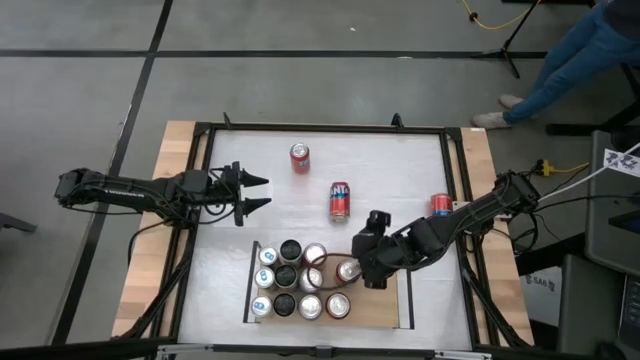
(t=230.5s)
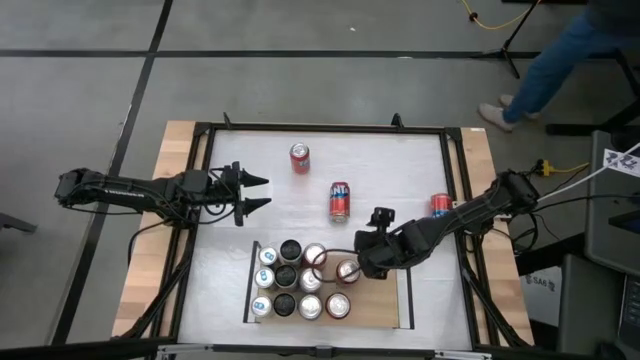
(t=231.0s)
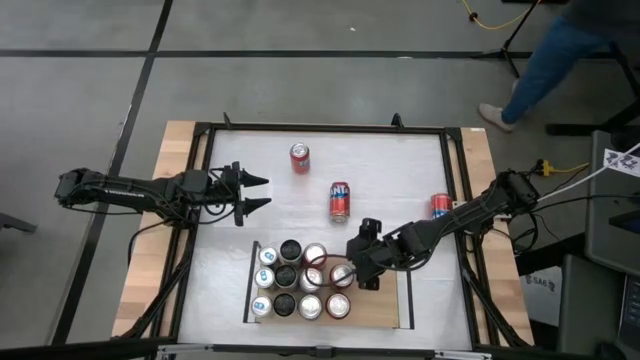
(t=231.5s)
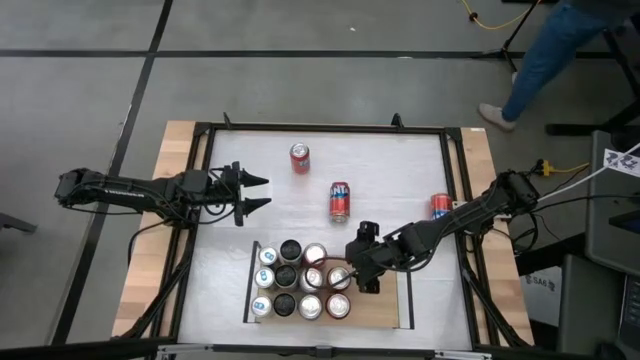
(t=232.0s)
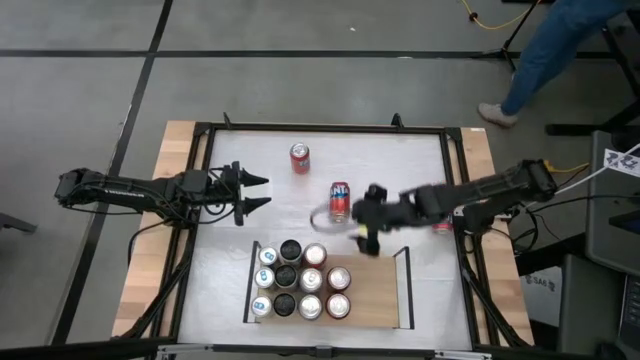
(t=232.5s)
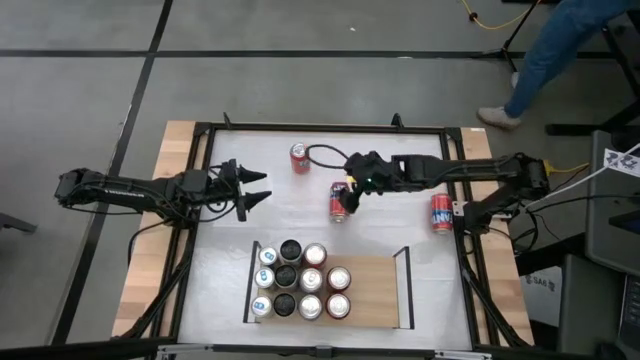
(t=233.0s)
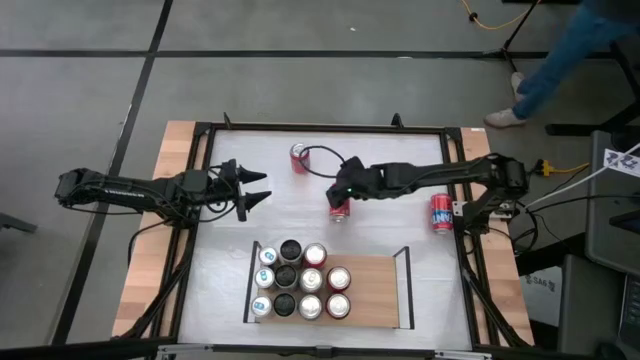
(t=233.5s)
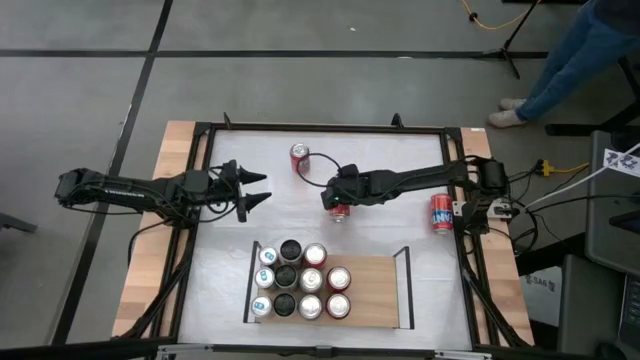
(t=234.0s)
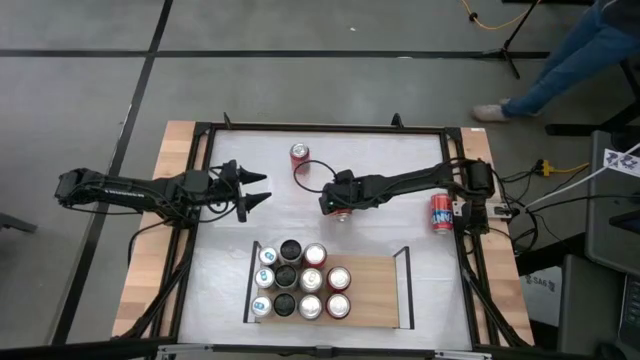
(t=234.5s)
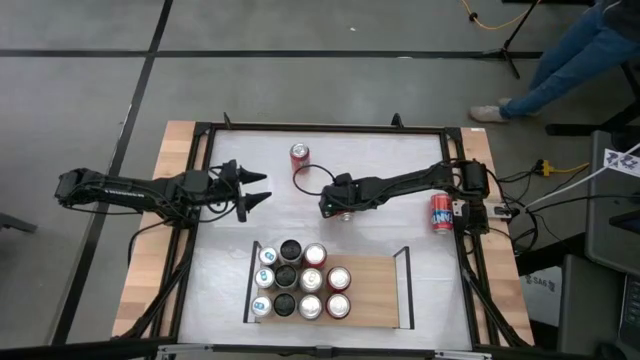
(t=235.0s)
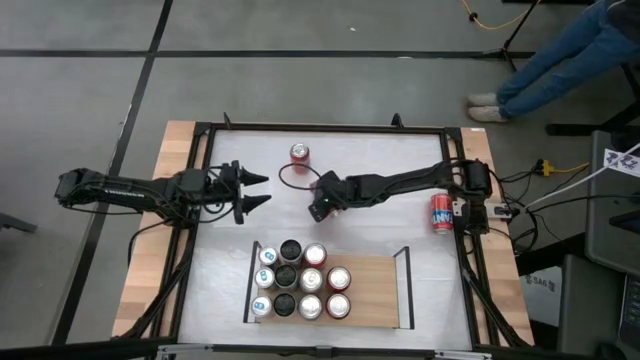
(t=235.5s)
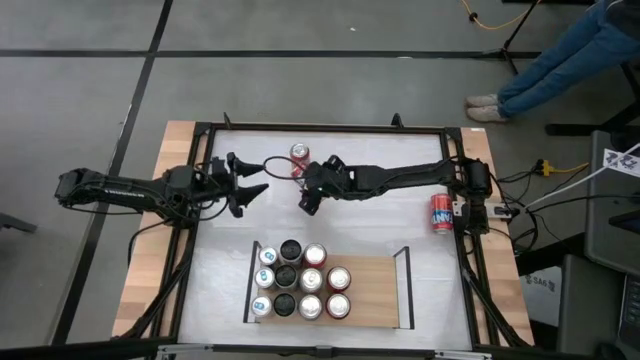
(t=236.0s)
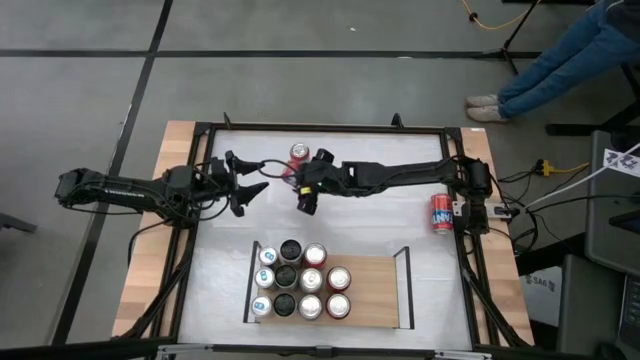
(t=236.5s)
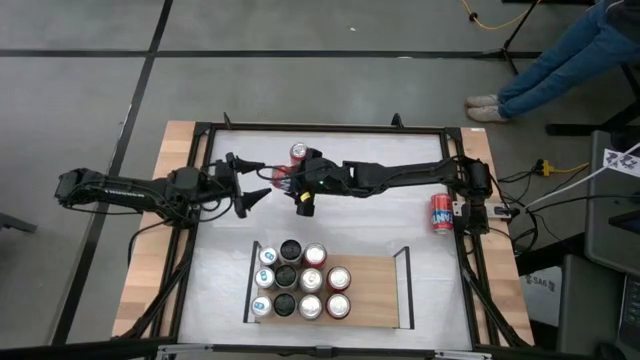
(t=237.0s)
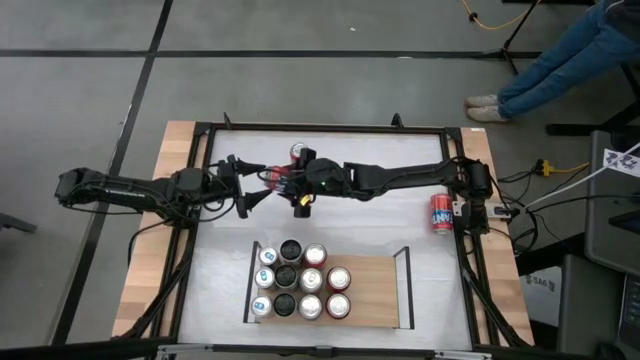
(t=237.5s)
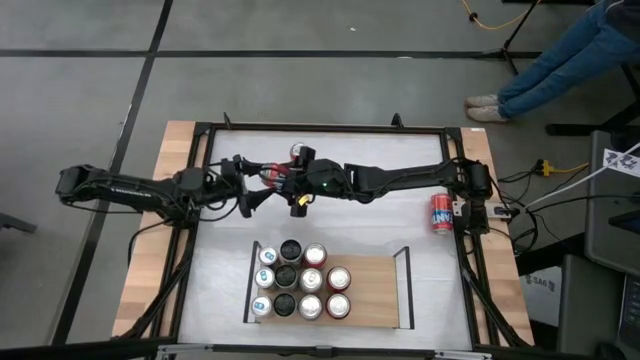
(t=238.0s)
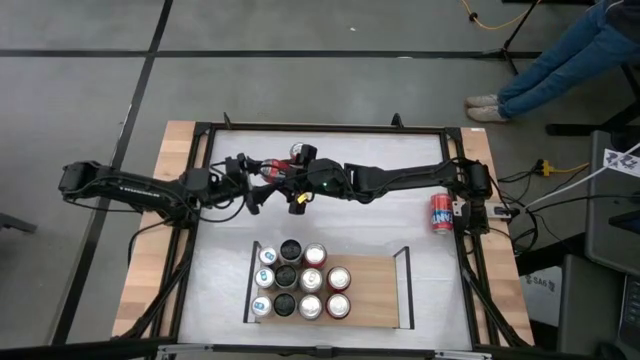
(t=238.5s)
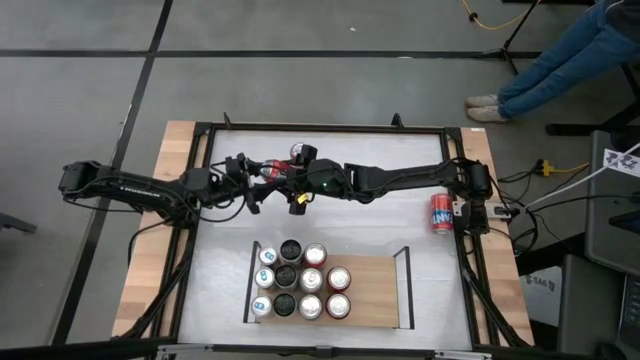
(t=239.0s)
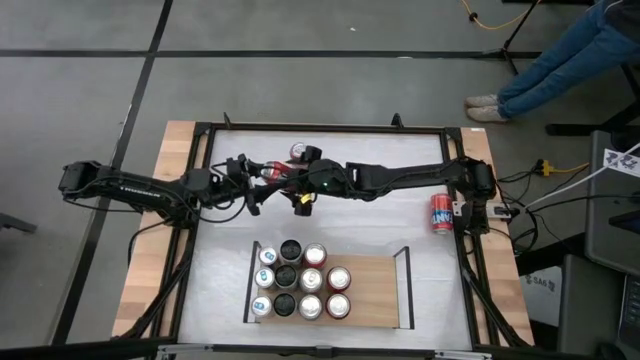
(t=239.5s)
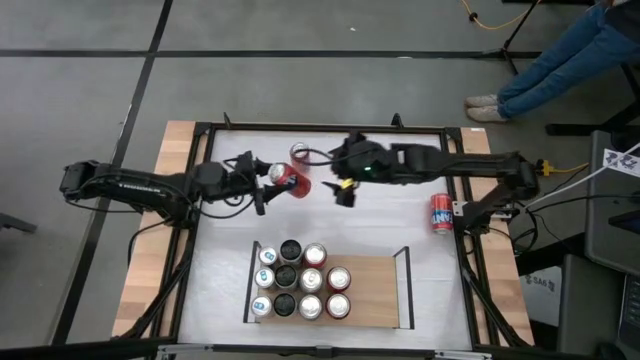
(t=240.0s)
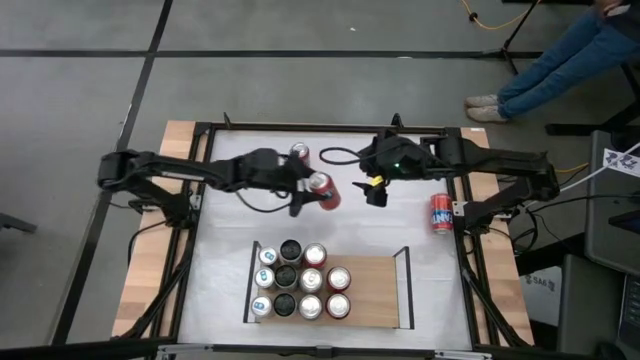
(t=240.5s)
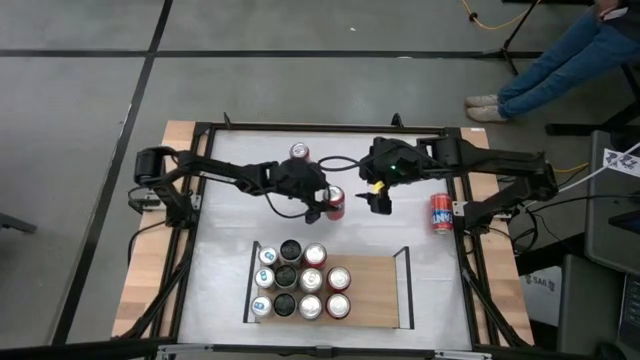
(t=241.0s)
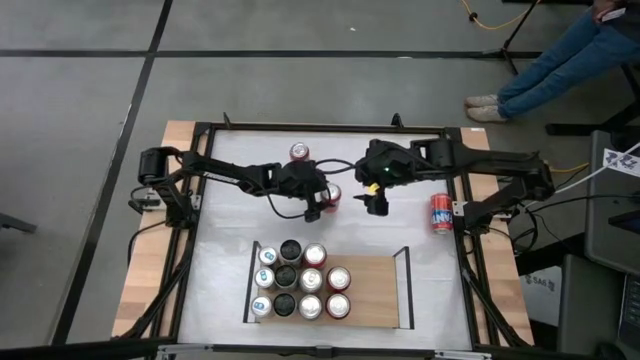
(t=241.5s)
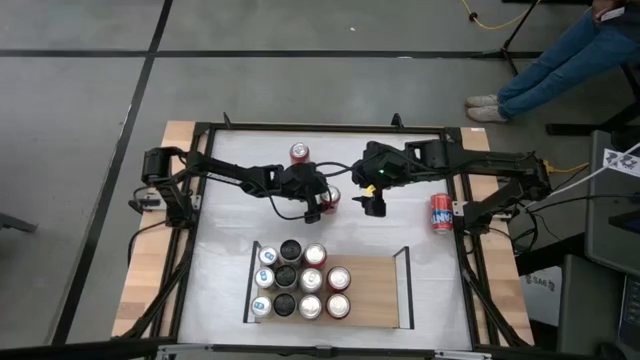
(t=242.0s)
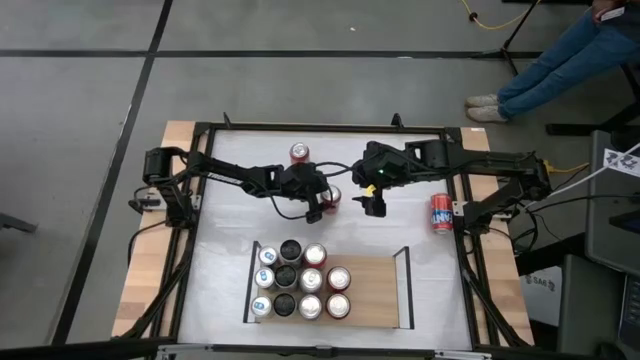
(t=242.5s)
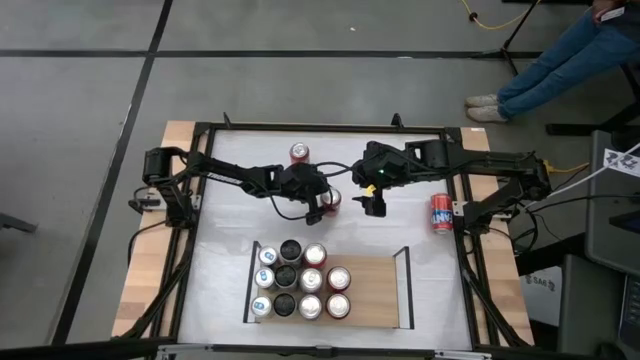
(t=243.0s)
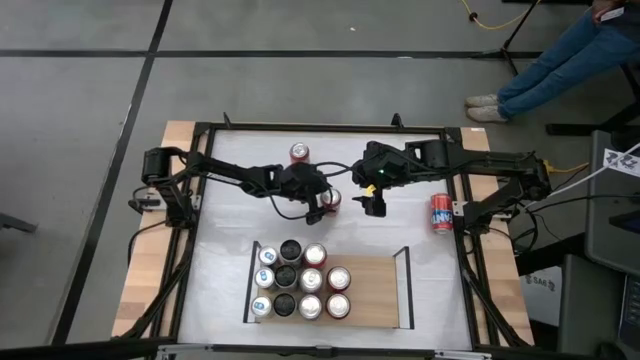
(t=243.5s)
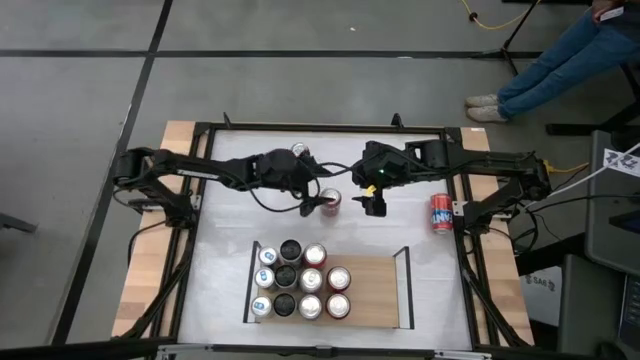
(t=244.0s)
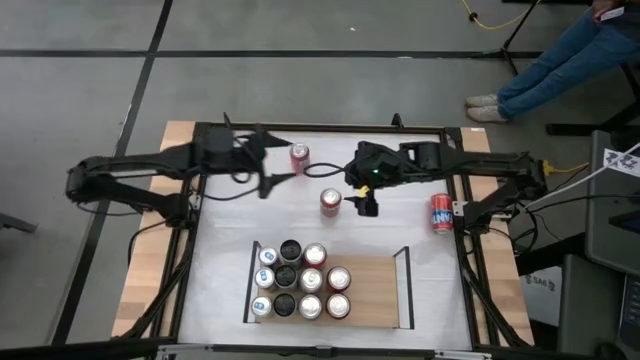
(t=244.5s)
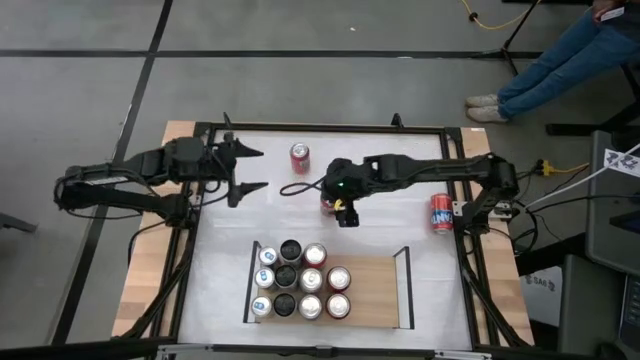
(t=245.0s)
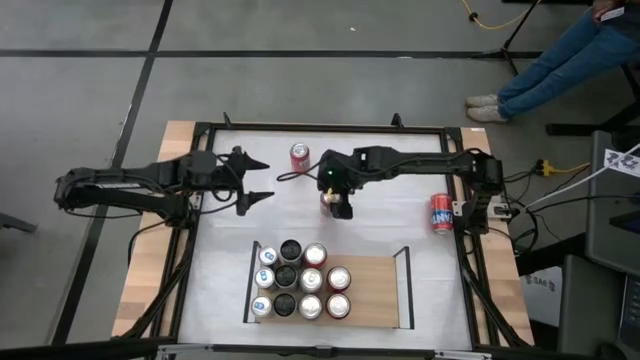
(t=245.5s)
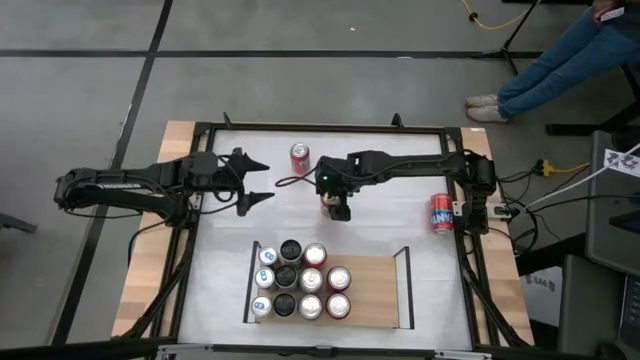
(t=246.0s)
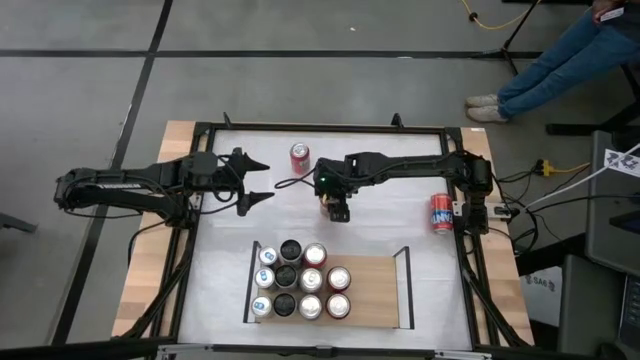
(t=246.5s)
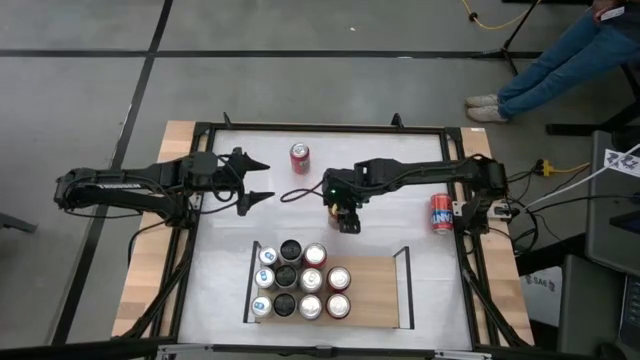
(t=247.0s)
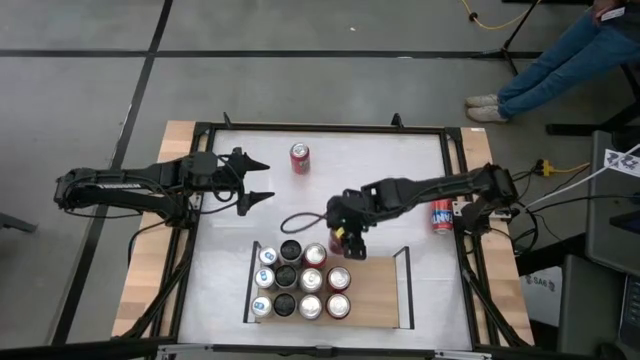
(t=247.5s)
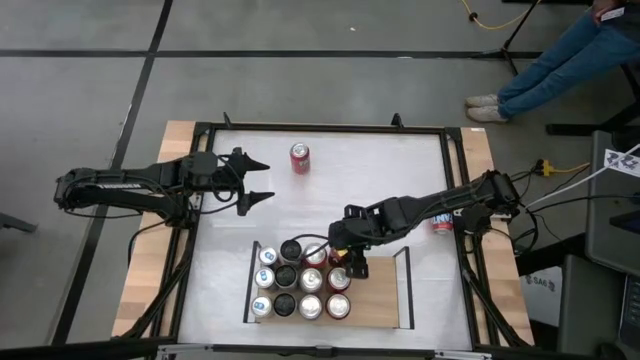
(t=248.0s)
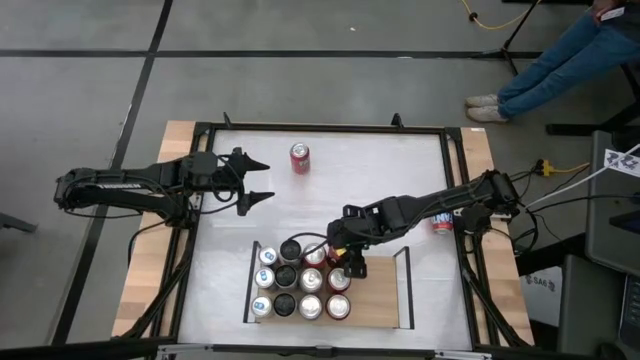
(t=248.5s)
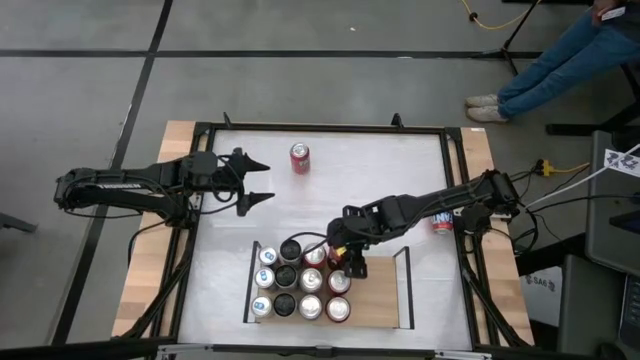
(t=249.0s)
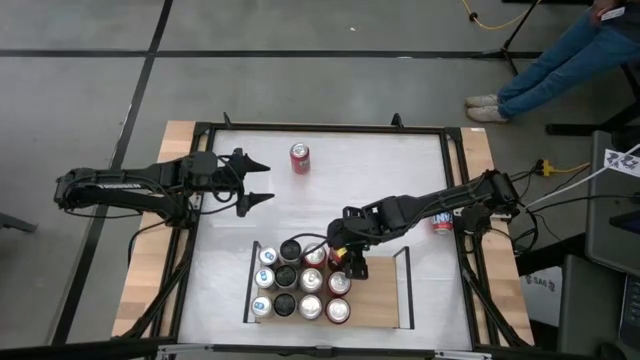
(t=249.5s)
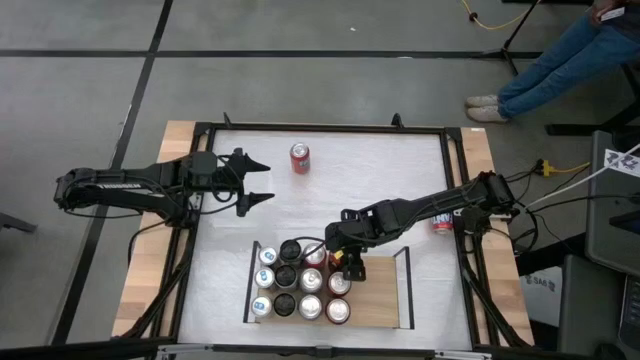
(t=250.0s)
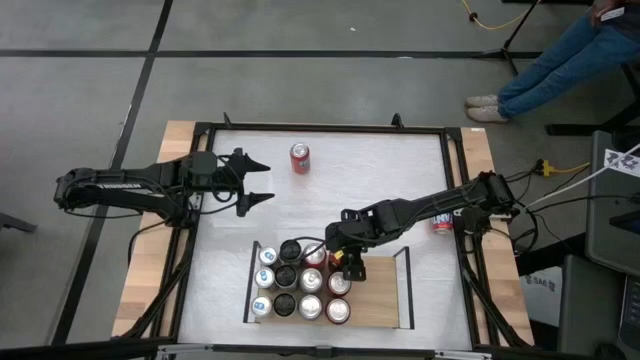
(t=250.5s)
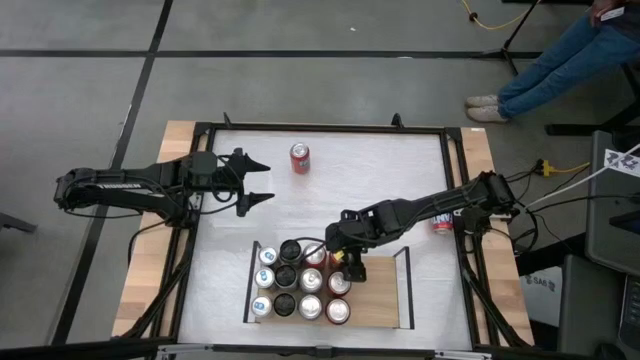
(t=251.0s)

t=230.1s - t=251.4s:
Task: Place canned beverage on shelf
Put the red soda can on the shelf aligned with the other red soda can
